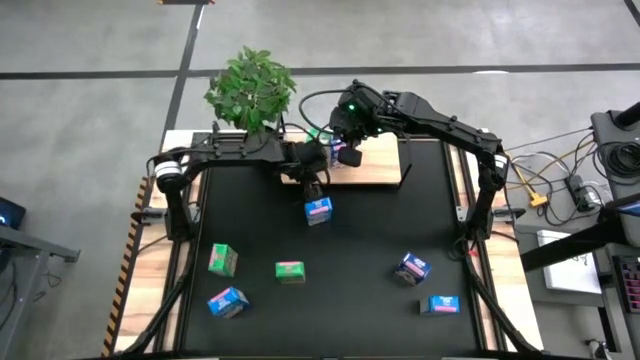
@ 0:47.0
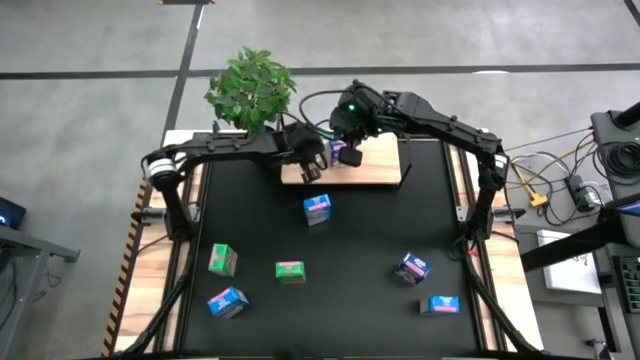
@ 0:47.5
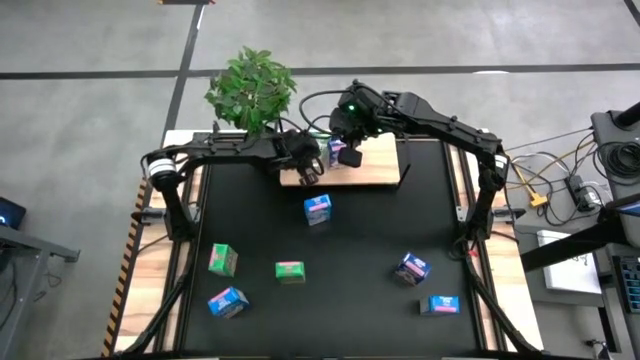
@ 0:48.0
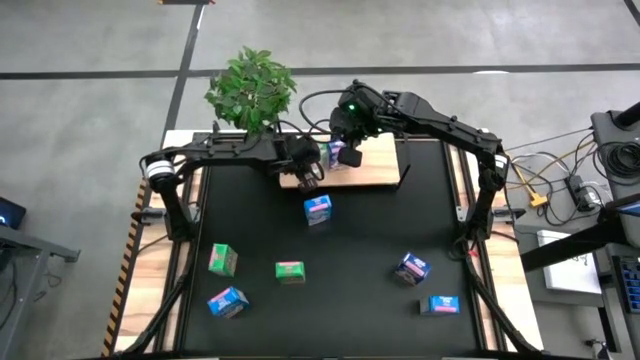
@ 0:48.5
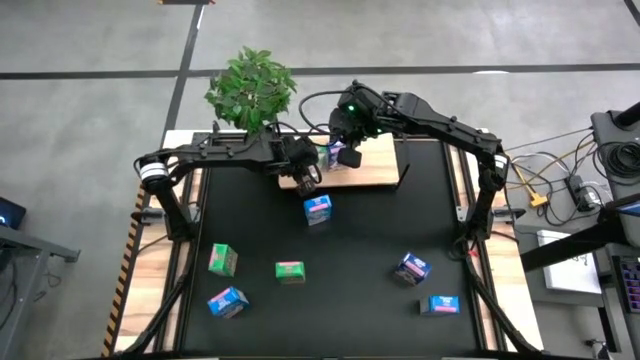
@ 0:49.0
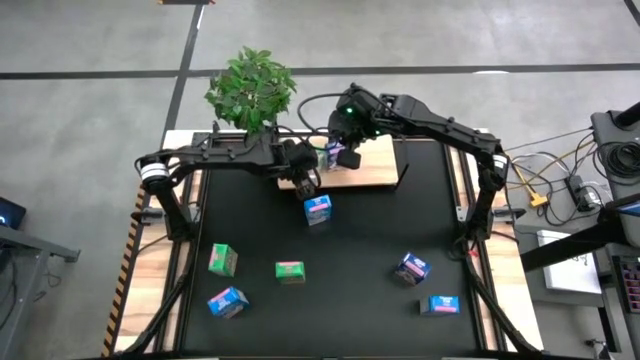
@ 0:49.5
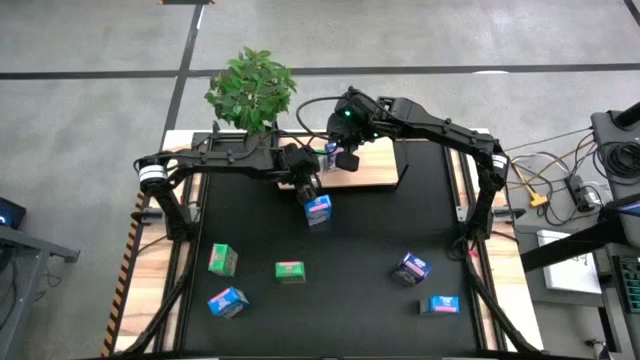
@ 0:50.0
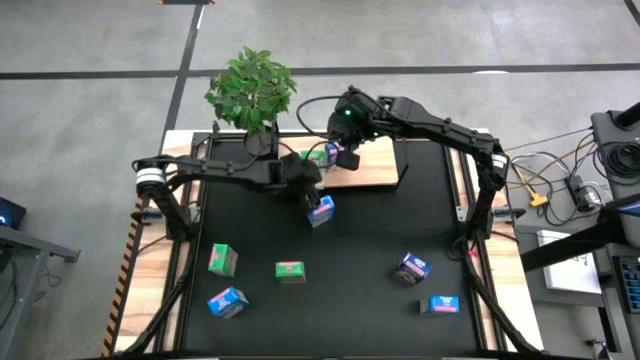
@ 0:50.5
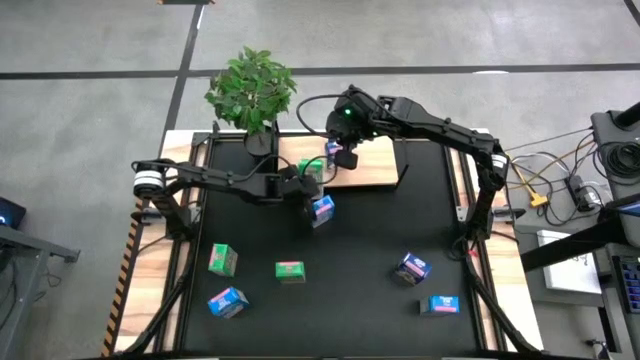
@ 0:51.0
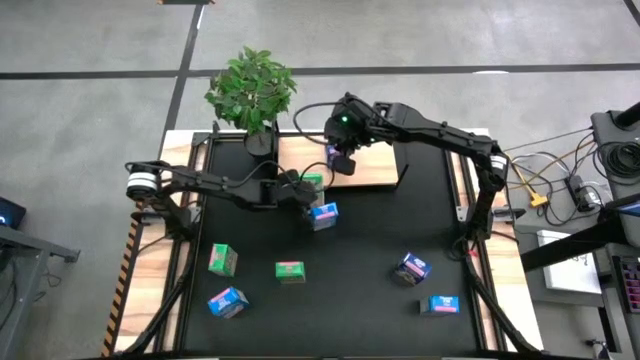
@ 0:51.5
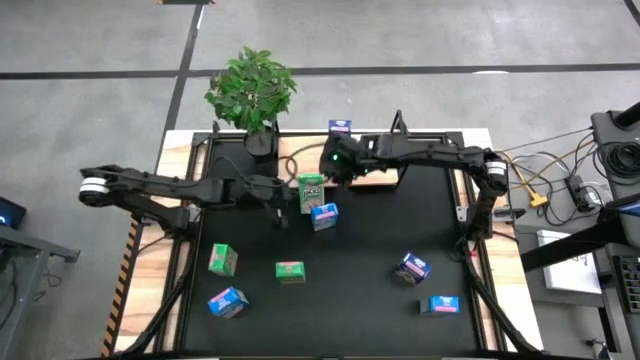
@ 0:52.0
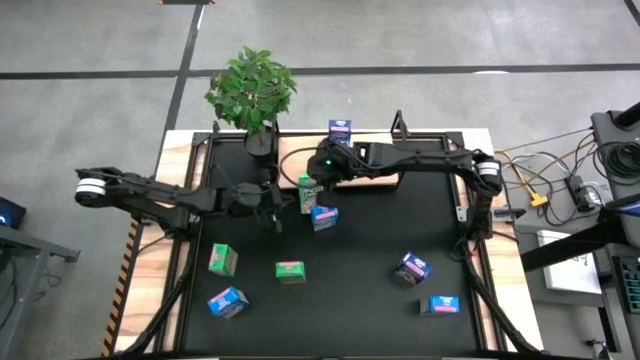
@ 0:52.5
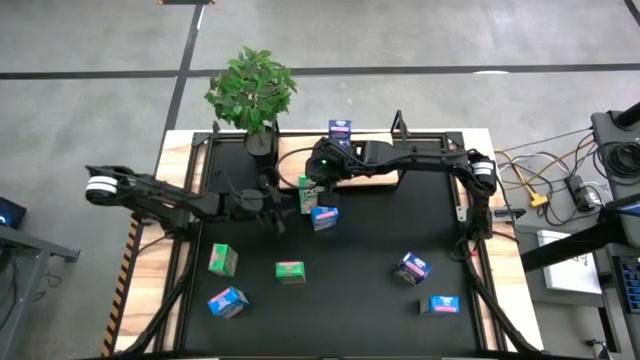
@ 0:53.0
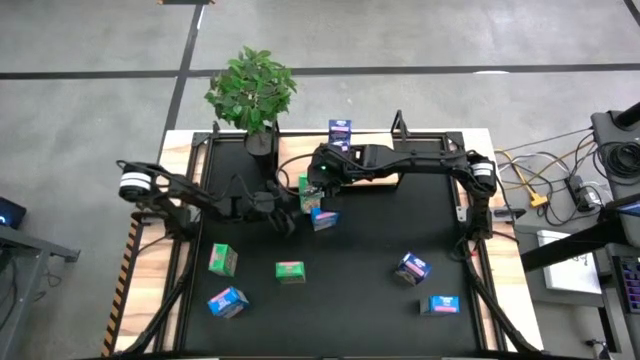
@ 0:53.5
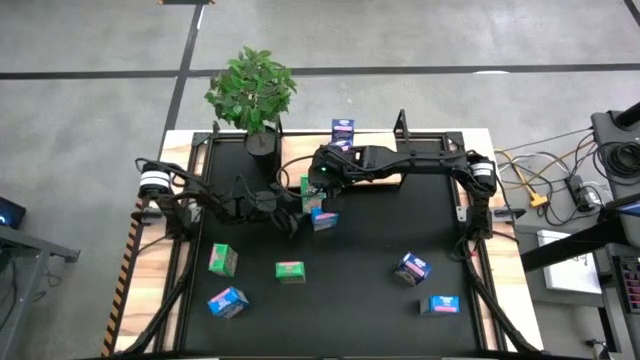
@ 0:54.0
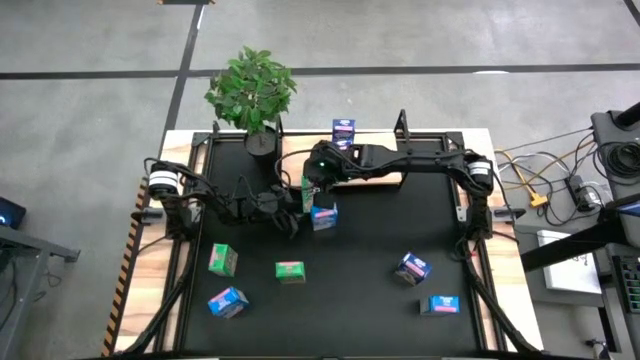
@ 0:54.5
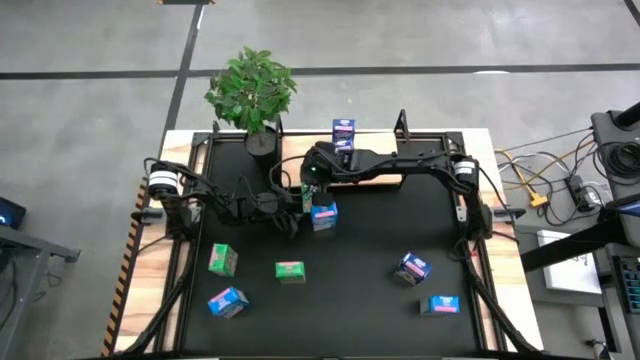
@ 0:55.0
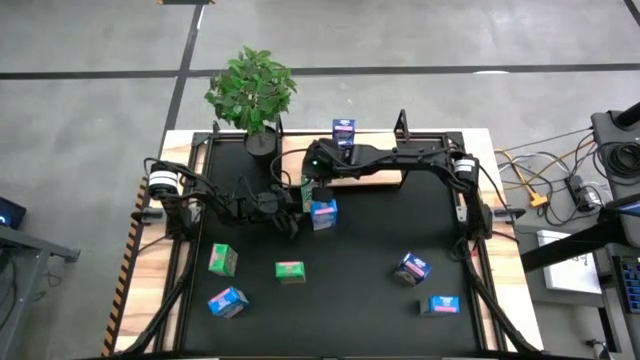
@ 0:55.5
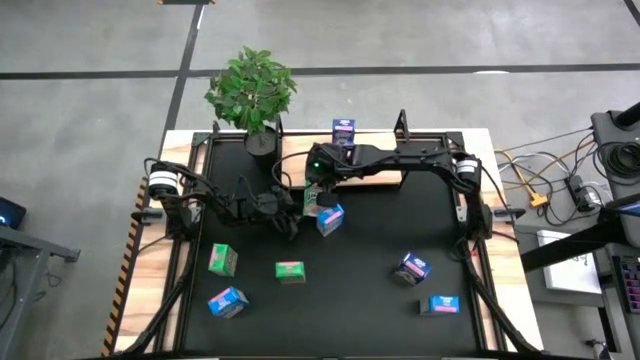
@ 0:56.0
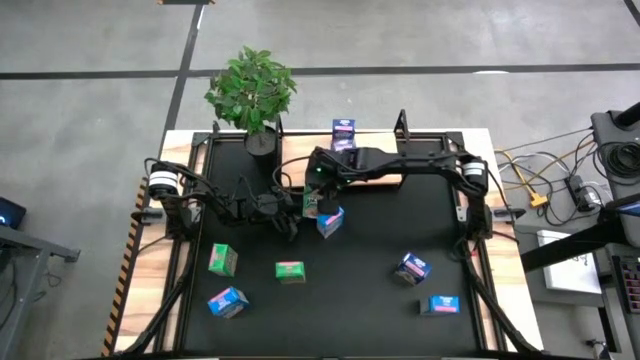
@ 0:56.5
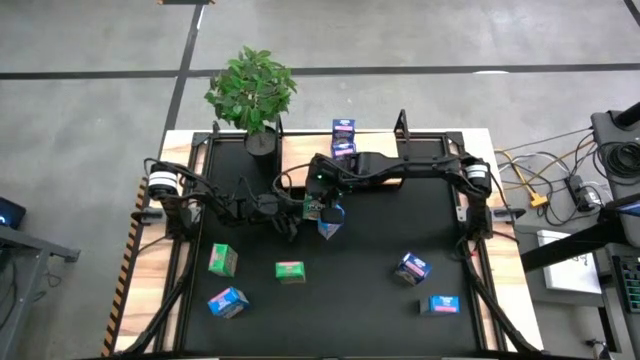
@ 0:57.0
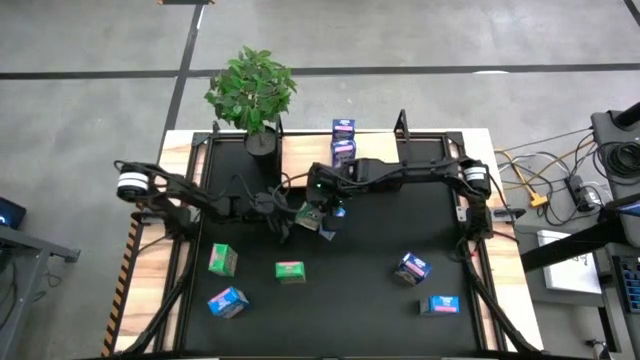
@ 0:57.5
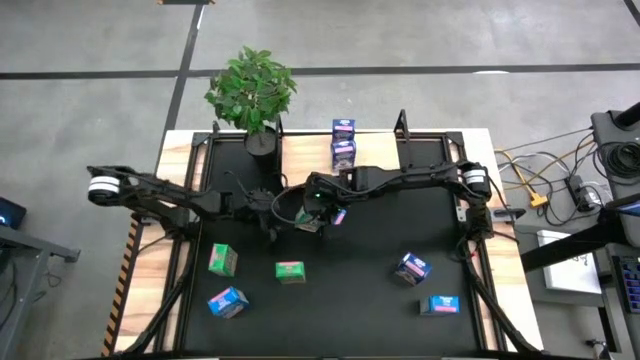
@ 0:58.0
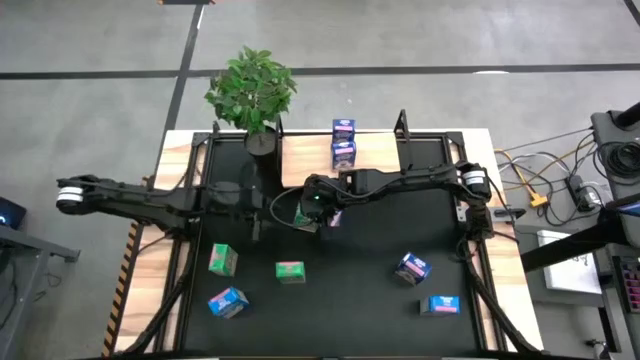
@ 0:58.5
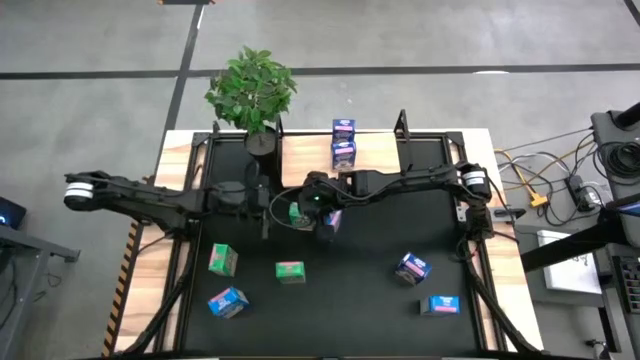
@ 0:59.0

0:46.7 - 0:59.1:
Task: Stack cereal on shelf
Put the top green cereal box on the shelf

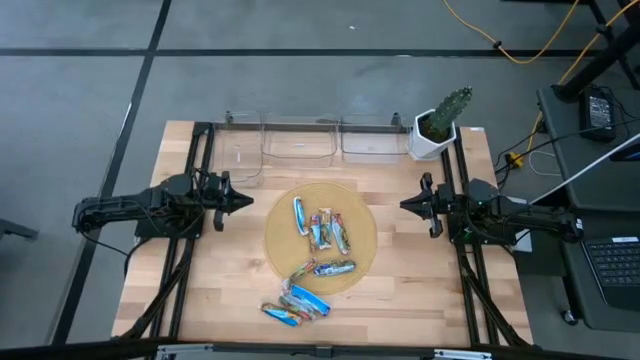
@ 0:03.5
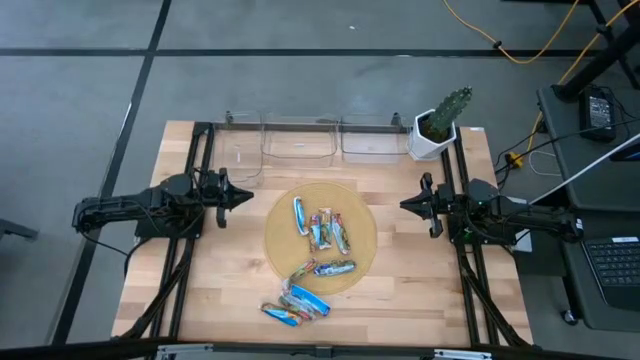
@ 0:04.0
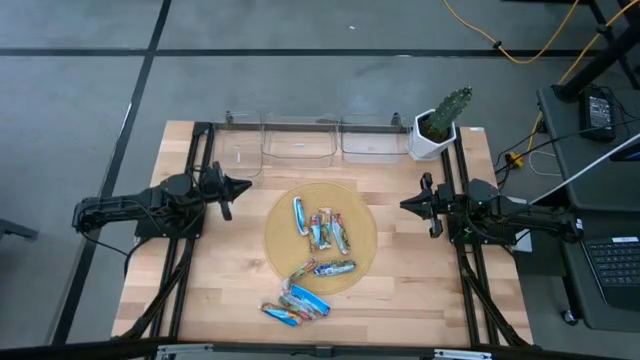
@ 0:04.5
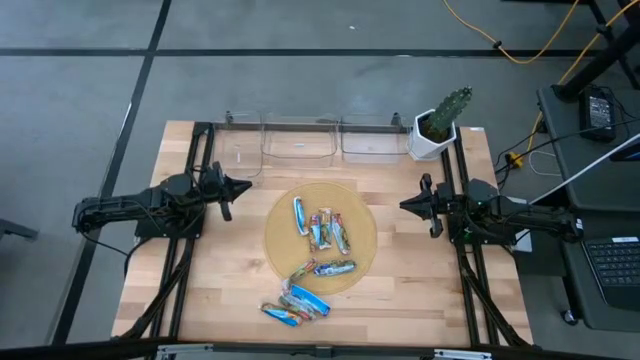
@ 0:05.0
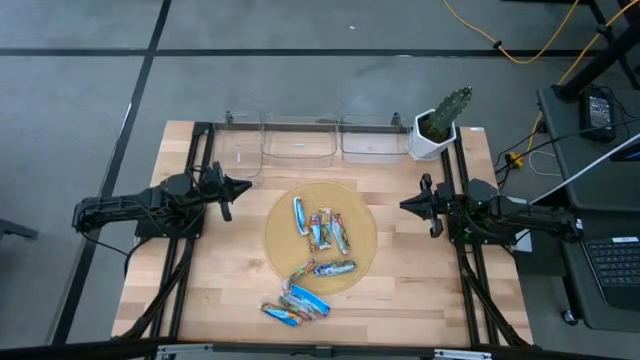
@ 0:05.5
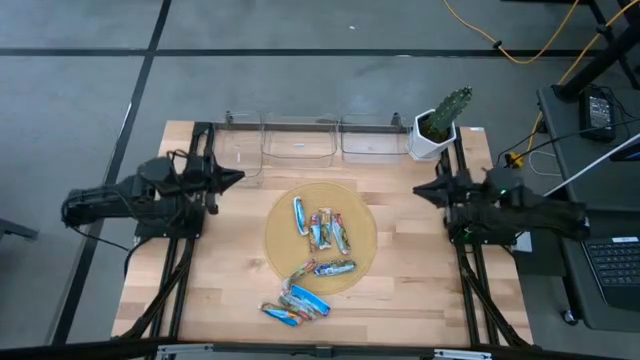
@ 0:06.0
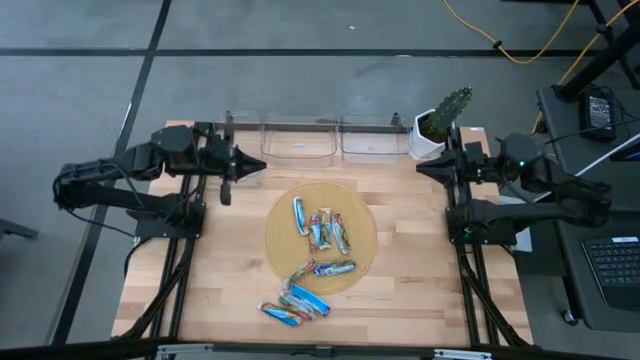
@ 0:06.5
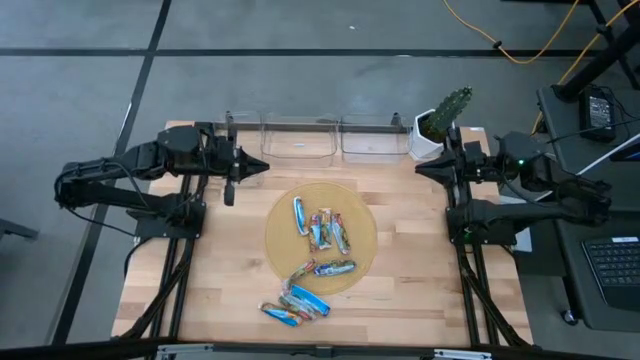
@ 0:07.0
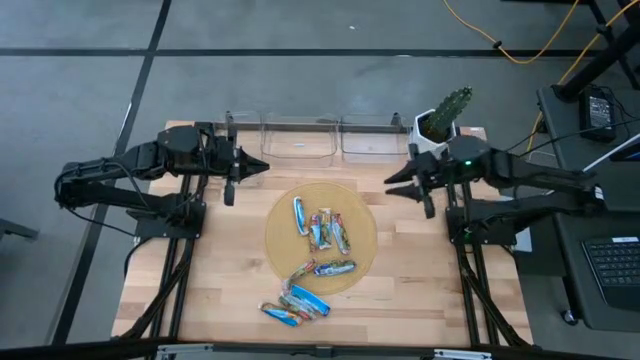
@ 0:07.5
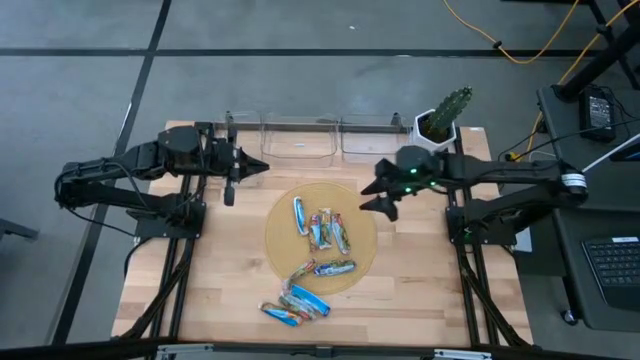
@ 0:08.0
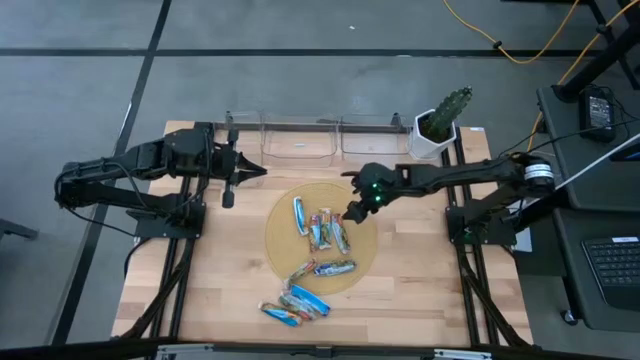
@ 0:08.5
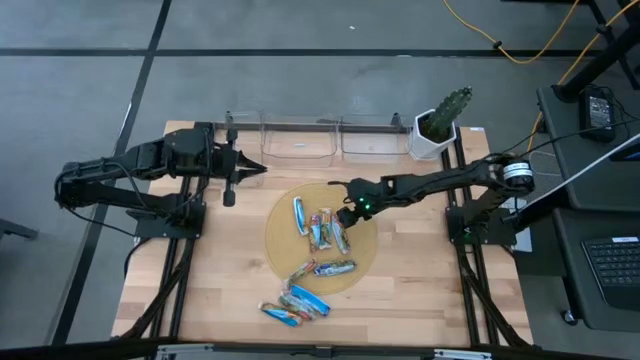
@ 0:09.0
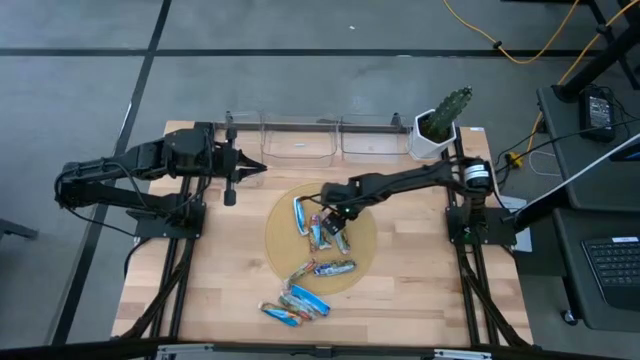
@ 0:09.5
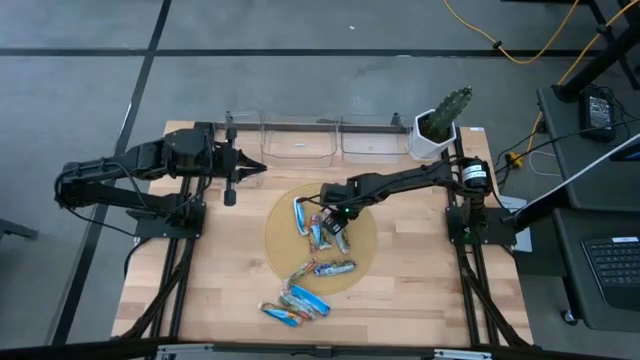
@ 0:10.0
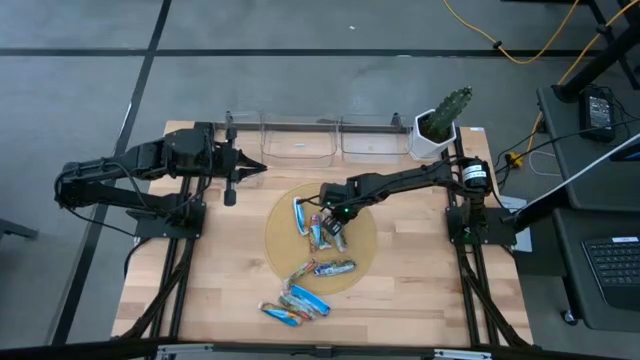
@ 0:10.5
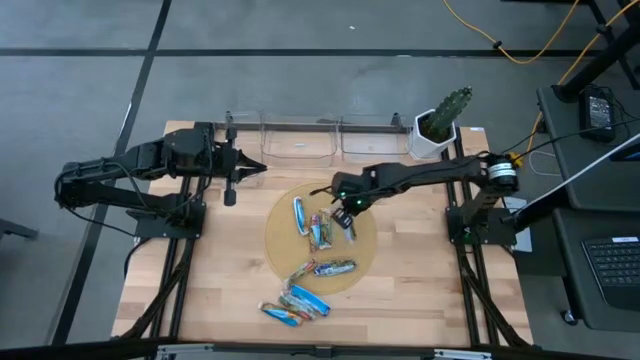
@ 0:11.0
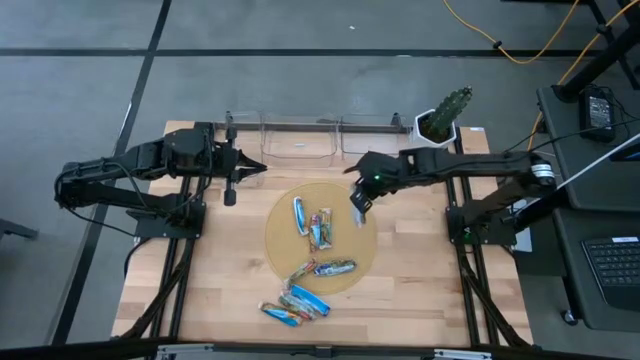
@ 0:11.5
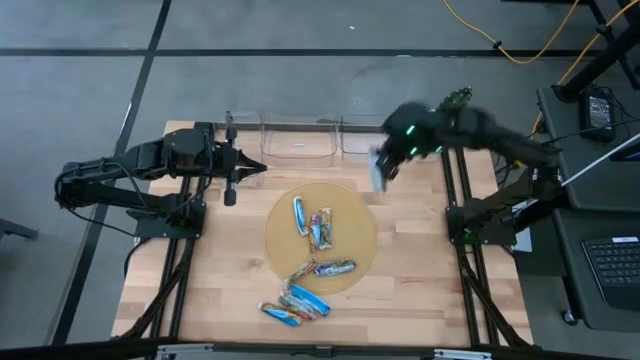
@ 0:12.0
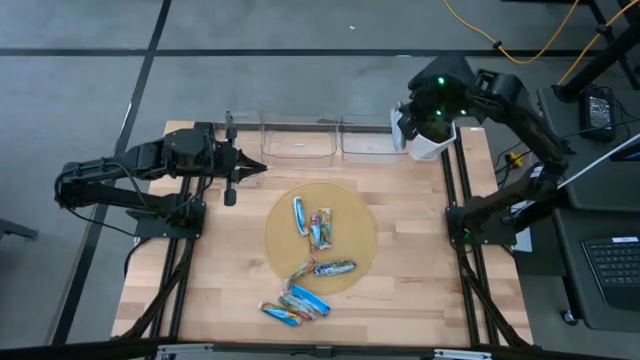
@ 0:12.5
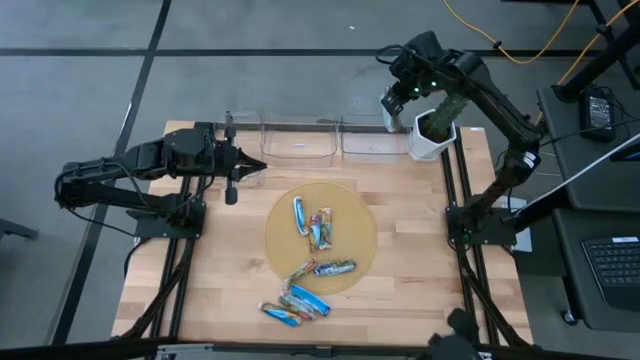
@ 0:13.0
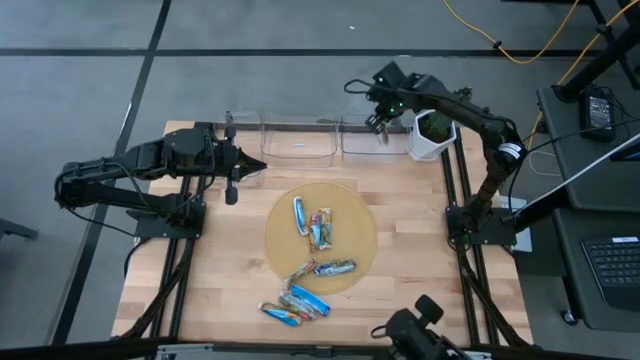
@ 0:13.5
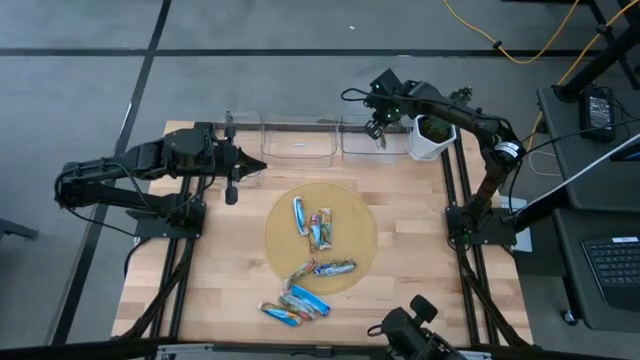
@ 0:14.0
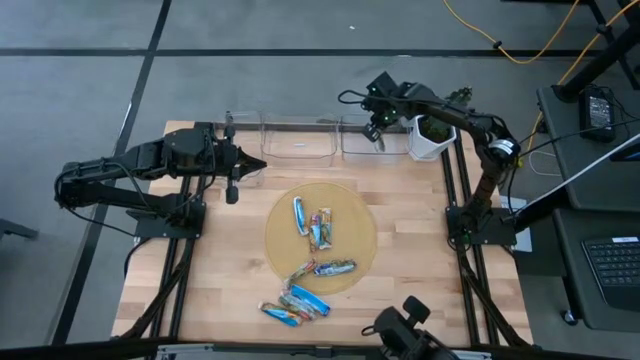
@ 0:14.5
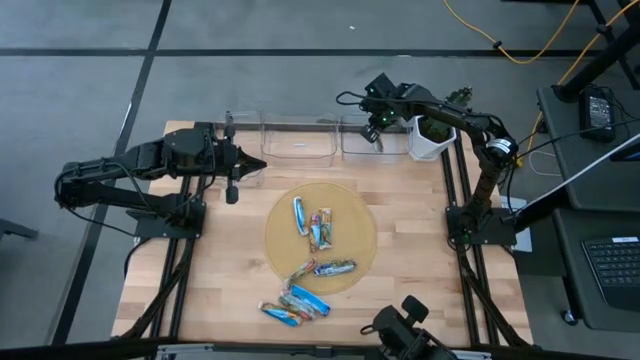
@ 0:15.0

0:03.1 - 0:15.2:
Task: Pick and place Granola Bars by type
Put the red granola bar into the right transparent bin
